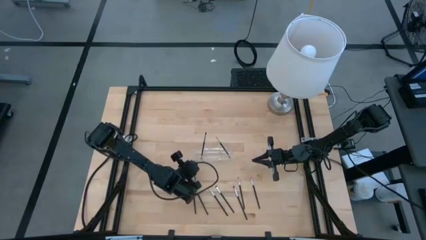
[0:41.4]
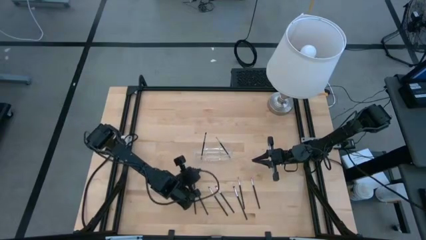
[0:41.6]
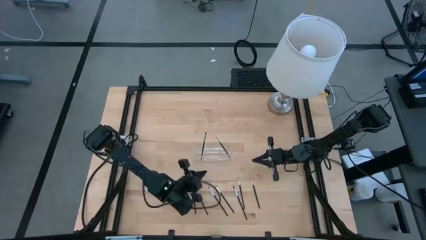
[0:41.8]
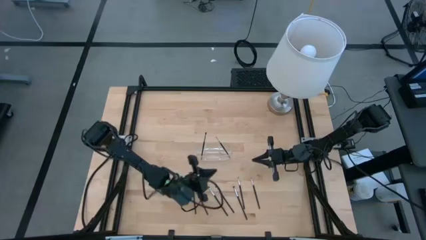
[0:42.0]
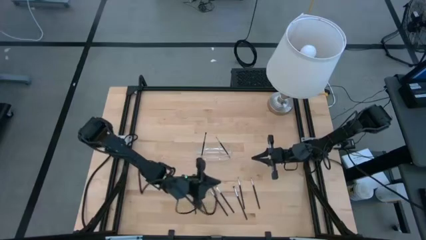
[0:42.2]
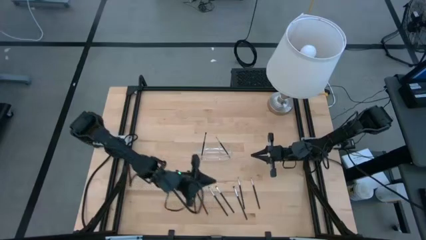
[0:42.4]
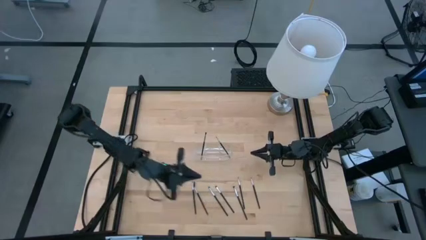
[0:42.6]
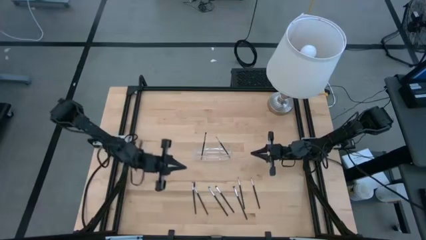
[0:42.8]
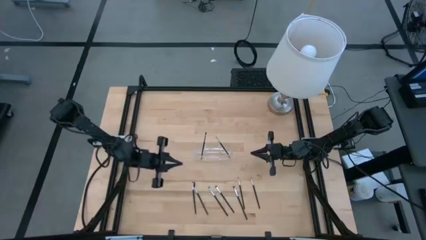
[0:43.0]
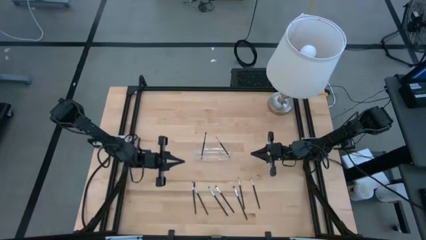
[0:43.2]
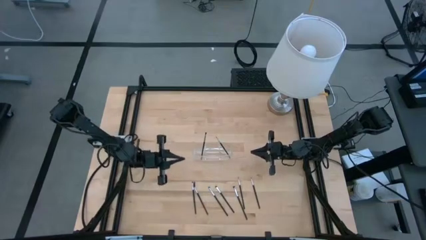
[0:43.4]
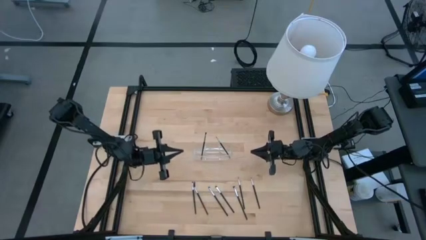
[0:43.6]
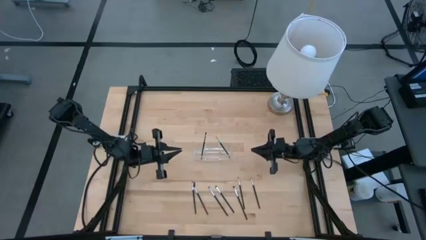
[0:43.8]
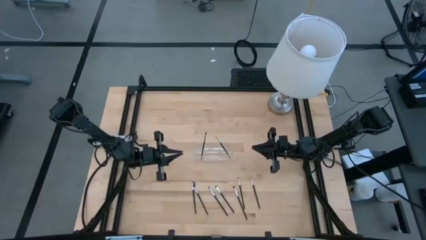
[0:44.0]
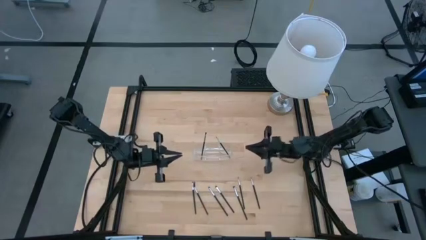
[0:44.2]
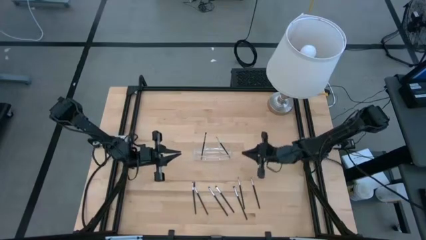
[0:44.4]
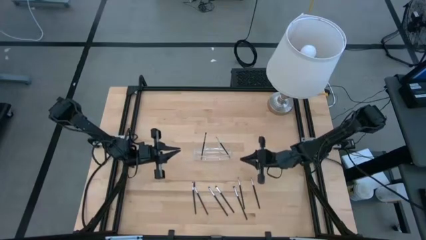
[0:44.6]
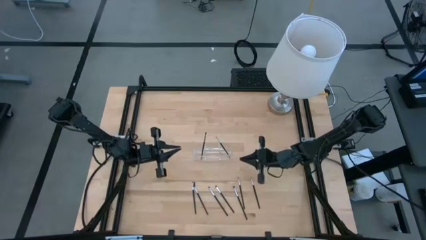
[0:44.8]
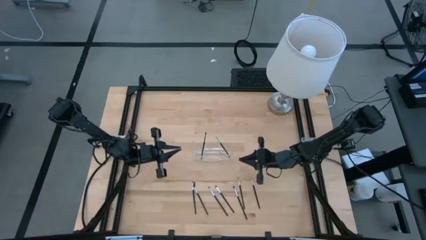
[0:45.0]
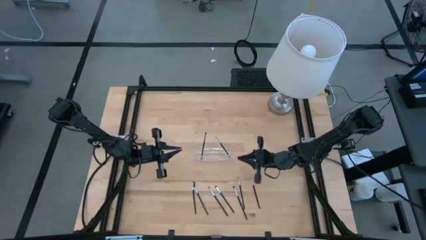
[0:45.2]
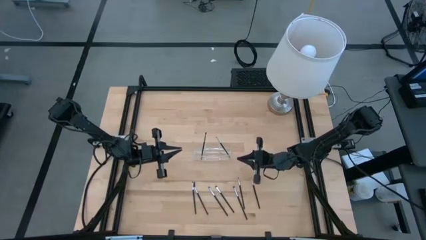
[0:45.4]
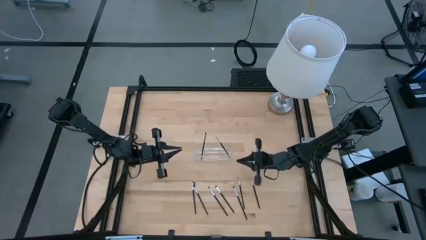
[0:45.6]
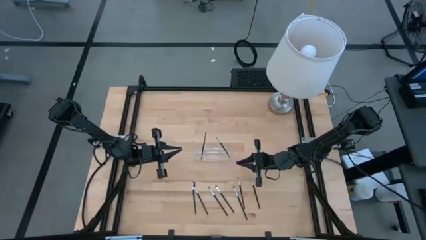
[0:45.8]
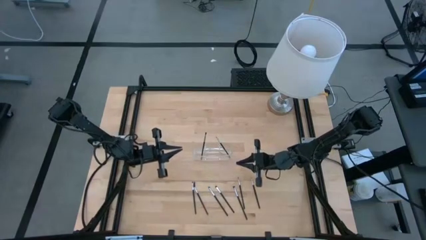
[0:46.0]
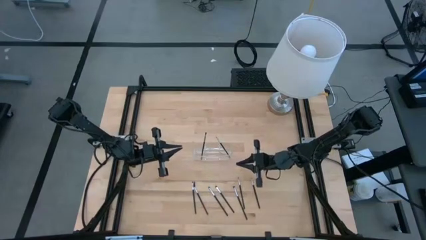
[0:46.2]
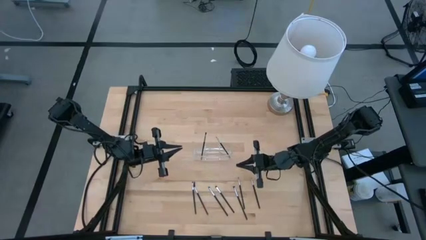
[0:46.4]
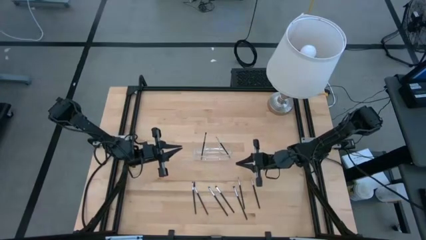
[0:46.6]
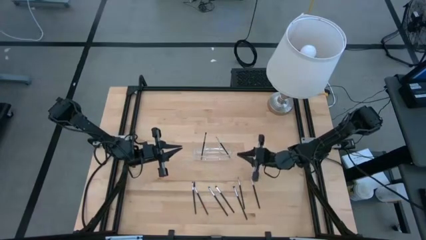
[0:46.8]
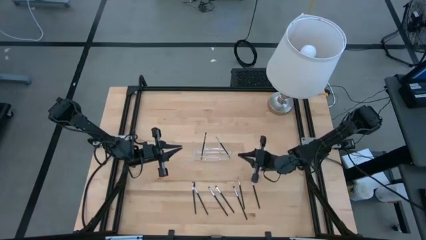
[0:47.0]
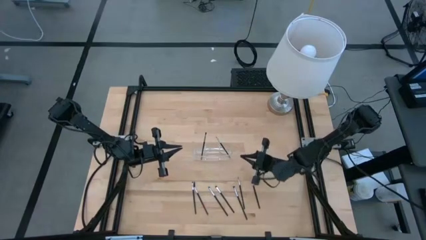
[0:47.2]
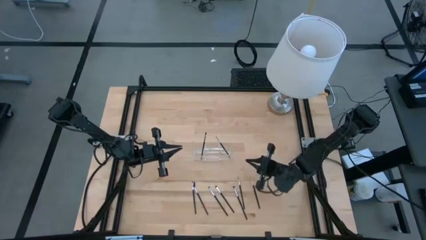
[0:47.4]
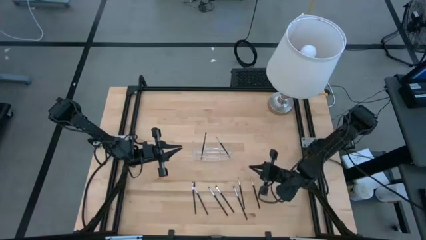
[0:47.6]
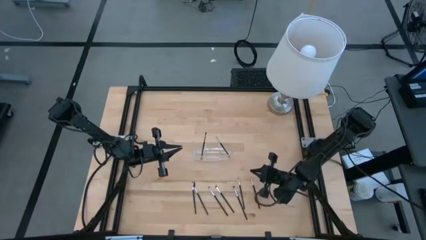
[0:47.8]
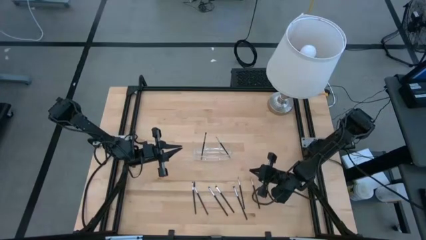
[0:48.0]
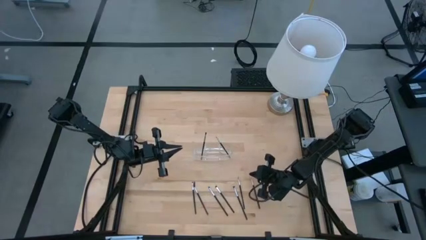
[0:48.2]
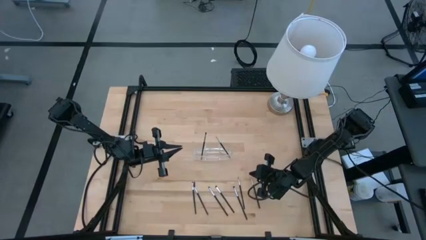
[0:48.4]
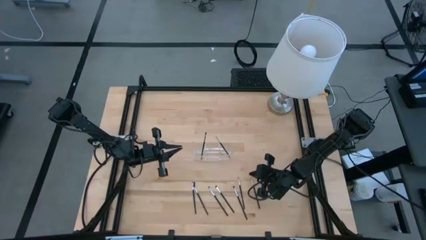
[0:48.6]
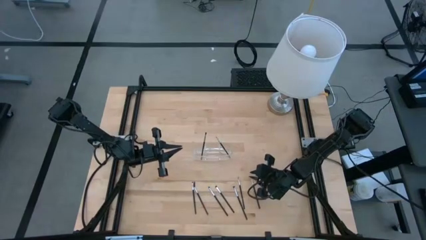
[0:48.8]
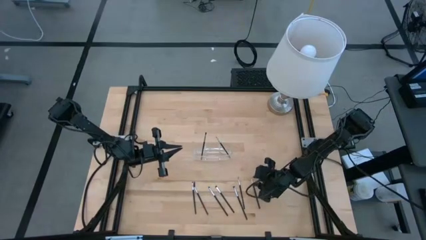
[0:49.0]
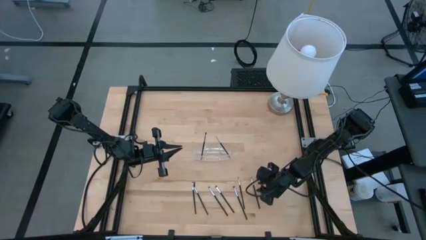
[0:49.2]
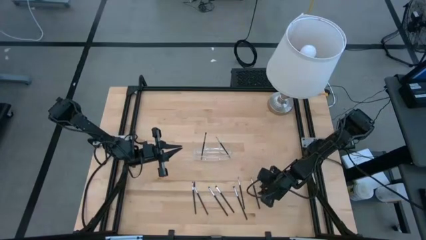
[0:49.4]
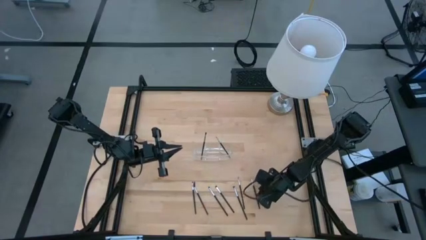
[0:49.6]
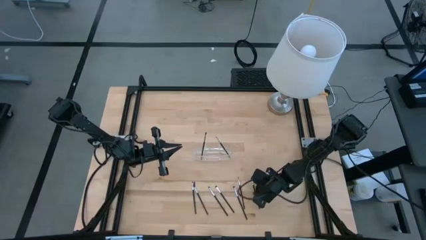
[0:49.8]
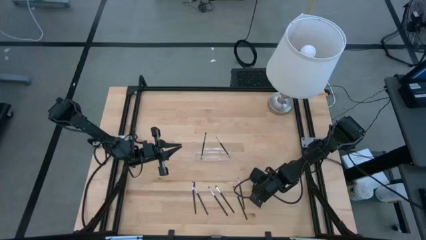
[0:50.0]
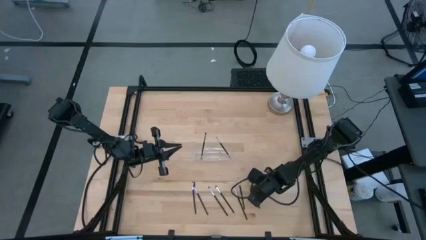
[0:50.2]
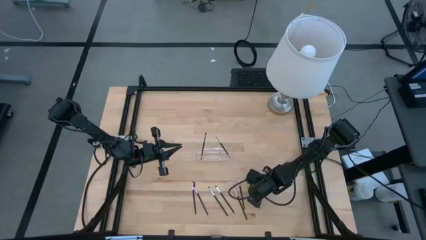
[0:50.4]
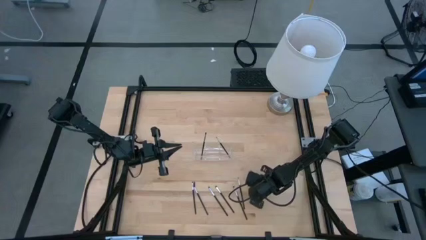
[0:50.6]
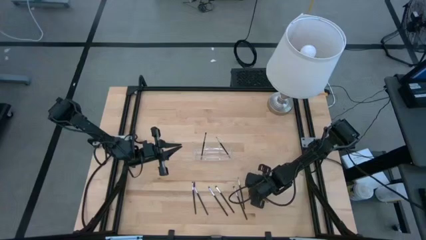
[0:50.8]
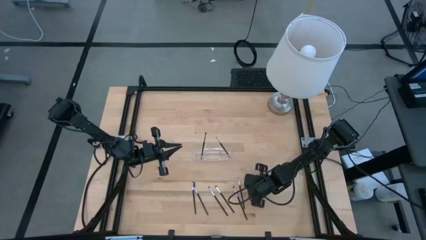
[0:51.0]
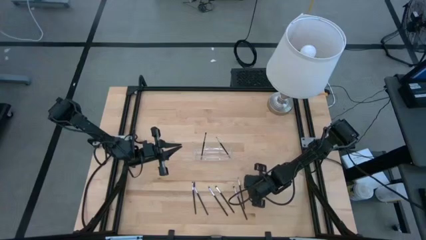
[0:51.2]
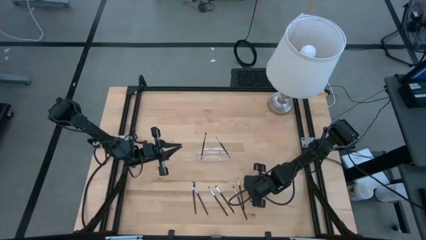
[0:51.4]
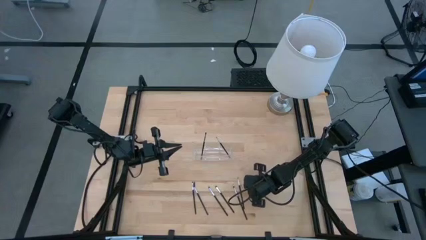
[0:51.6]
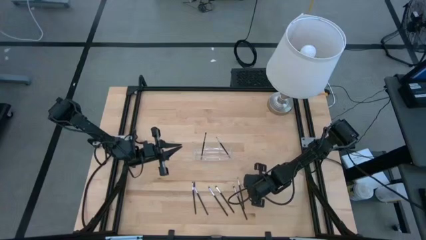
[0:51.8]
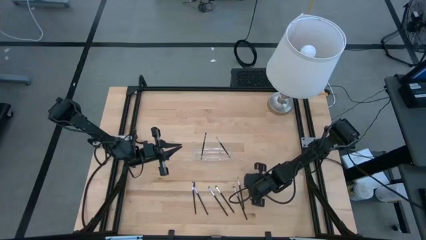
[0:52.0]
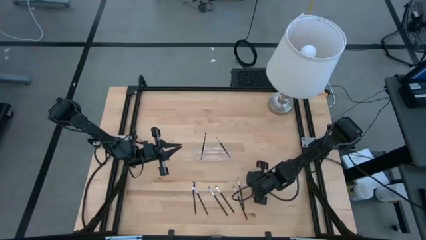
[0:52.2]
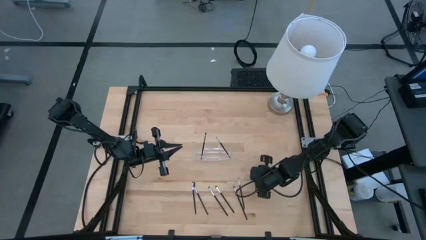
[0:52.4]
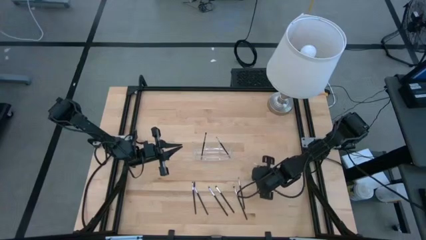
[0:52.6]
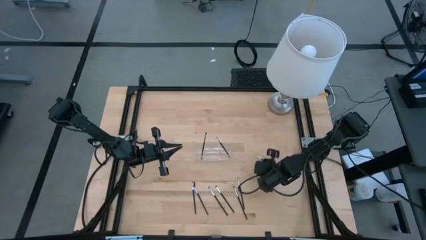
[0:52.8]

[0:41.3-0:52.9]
Task: Put items in baskets/containers
Put the liner brush in the transparent organizer

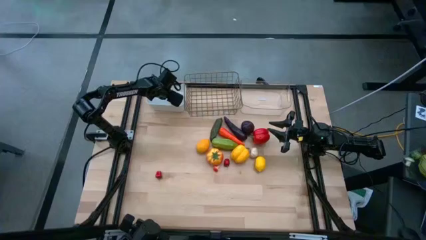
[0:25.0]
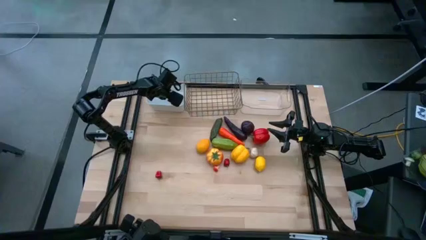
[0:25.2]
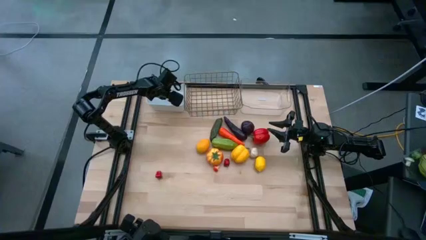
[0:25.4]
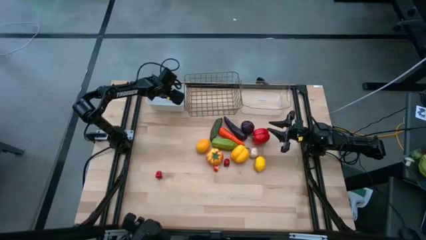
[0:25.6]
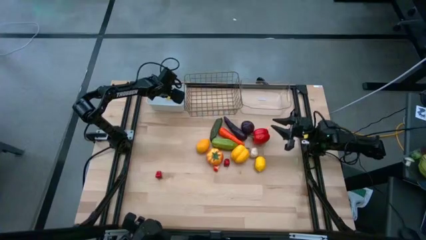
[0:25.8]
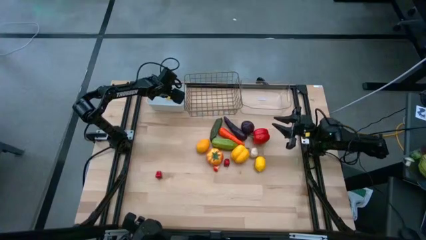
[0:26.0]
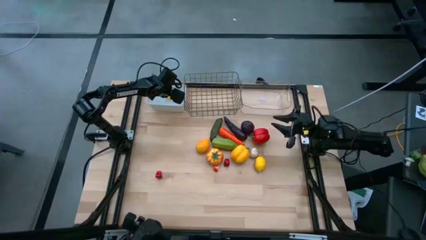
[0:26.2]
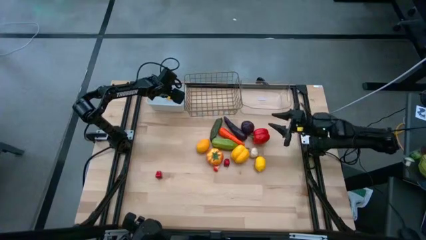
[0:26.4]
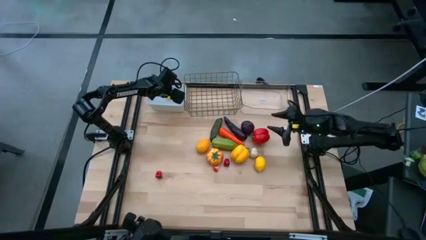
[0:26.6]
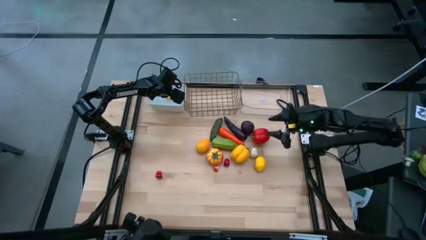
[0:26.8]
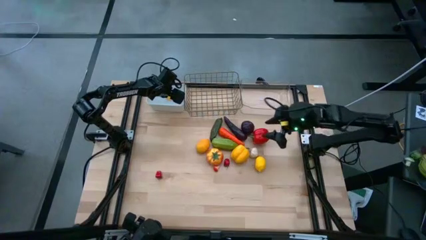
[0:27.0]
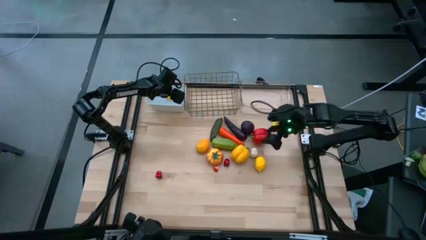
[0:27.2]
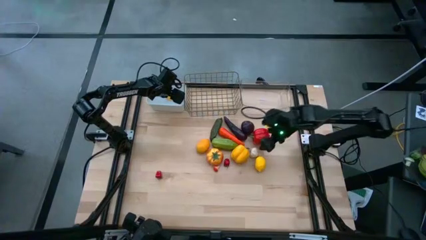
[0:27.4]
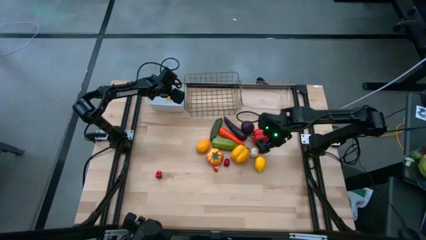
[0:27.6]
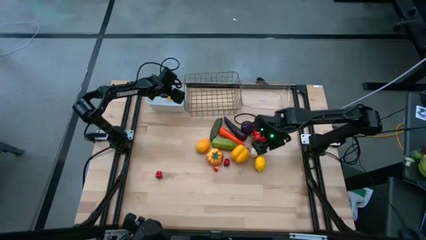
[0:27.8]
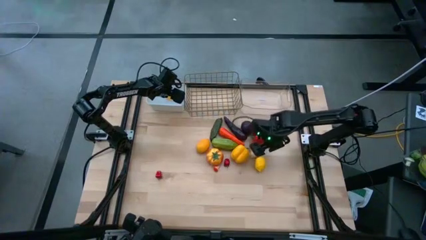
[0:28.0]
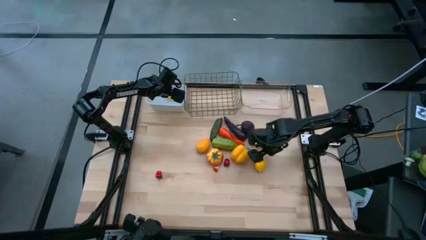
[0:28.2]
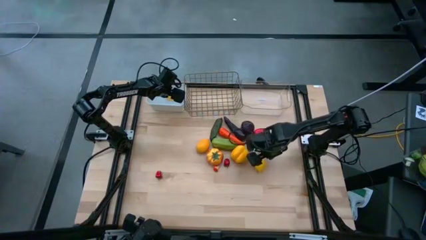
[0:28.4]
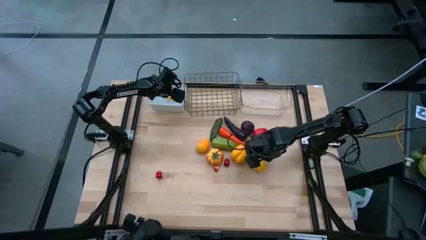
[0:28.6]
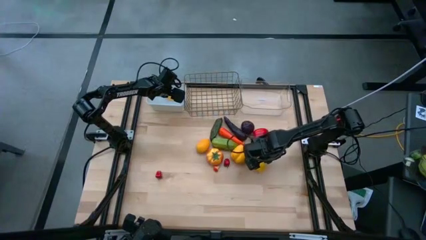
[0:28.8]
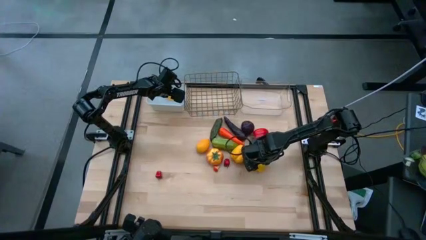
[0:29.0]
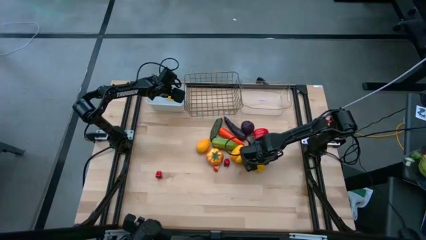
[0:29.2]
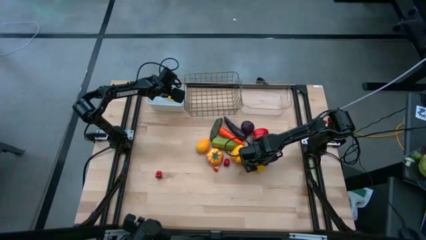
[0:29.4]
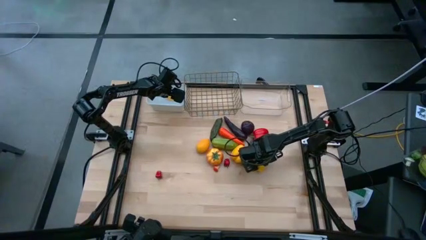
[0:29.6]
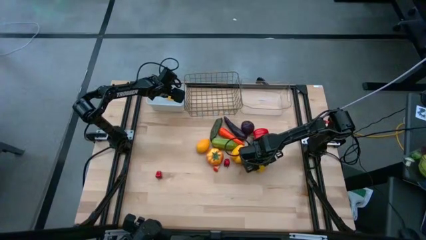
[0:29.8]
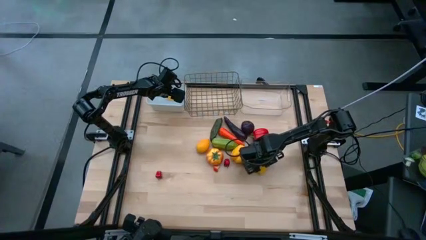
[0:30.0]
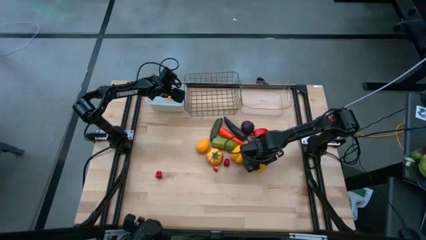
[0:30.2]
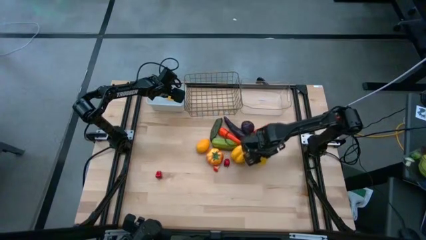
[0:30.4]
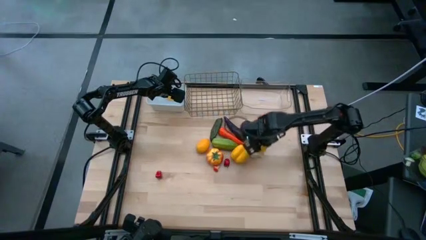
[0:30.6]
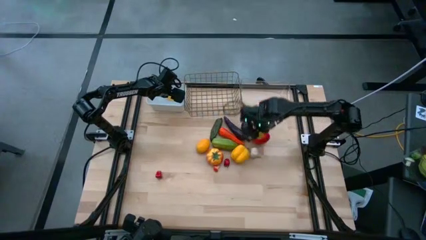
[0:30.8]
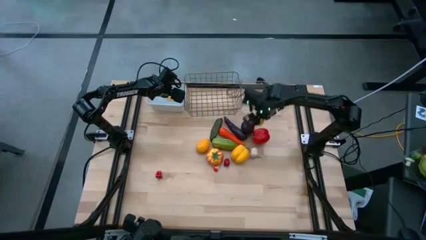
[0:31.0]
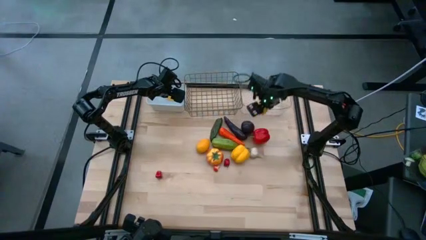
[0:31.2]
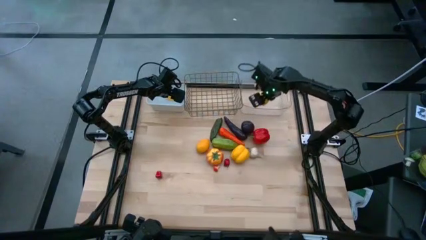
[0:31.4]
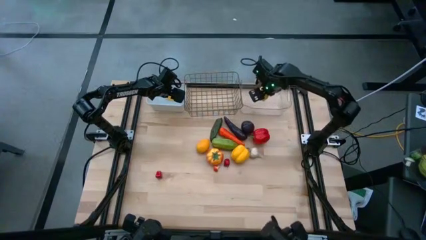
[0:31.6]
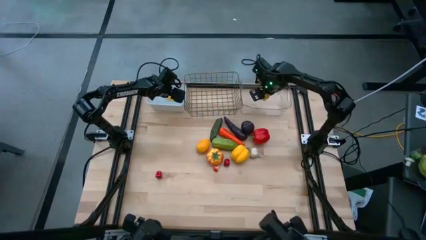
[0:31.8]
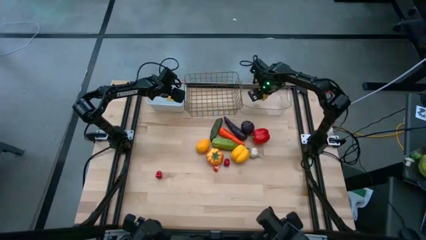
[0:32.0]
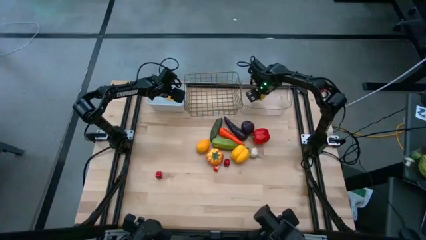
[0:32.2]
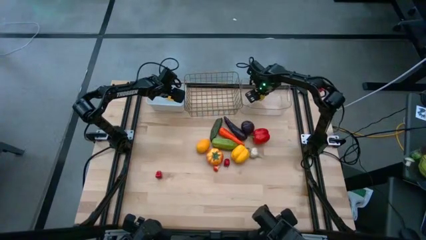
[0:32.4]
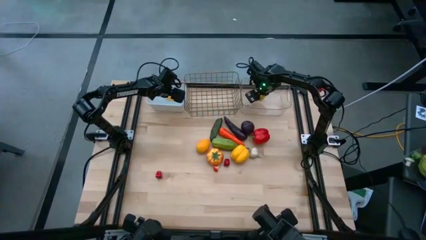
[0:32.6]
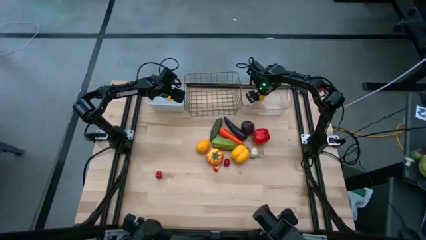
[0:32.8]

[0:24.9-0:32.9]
Task: Sort produce into baskets
Put the yellow lemon into the transparent bin
